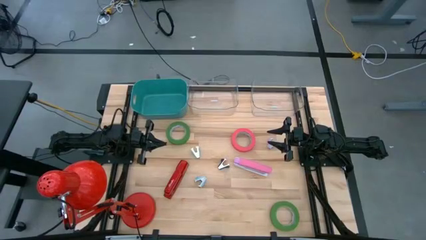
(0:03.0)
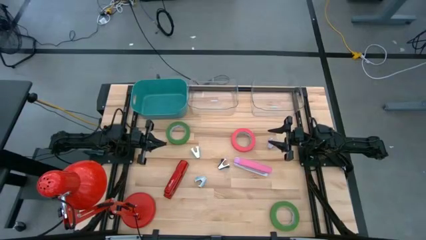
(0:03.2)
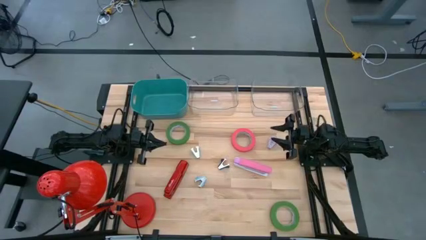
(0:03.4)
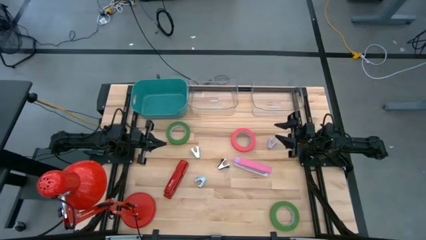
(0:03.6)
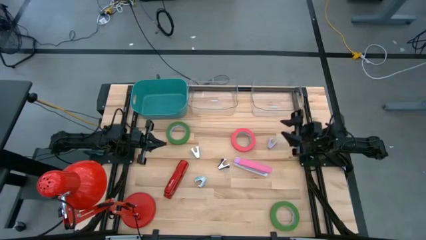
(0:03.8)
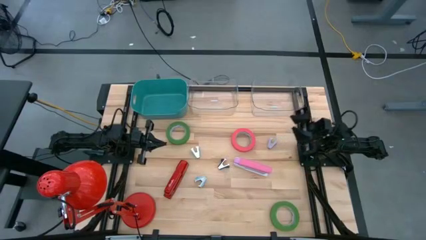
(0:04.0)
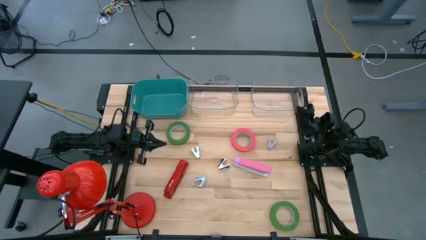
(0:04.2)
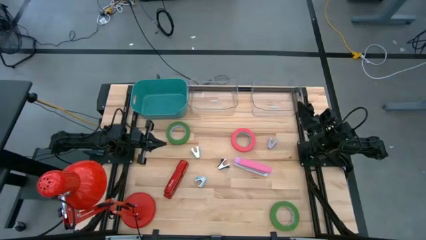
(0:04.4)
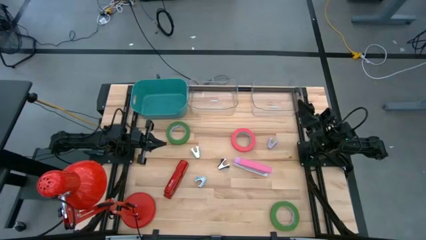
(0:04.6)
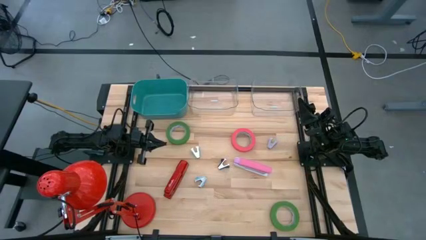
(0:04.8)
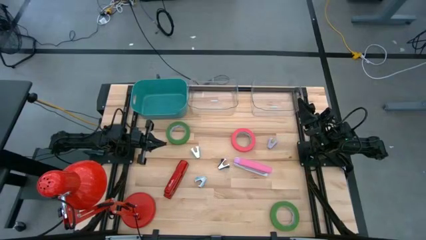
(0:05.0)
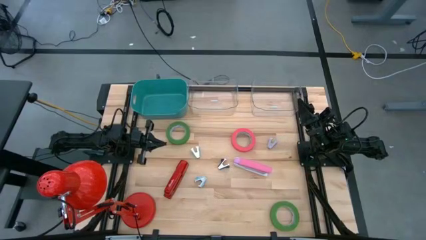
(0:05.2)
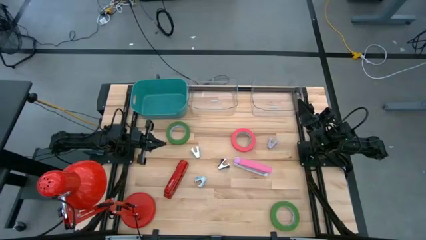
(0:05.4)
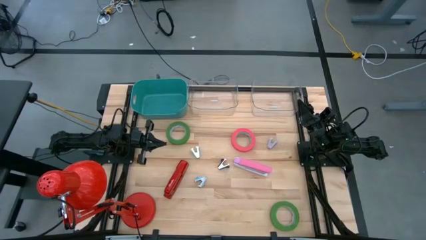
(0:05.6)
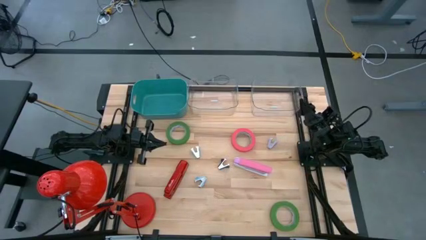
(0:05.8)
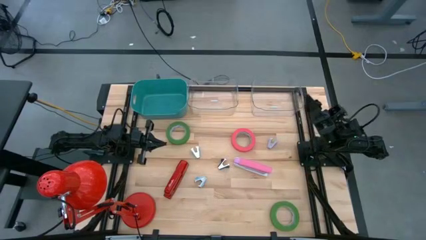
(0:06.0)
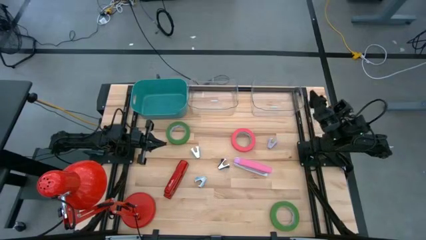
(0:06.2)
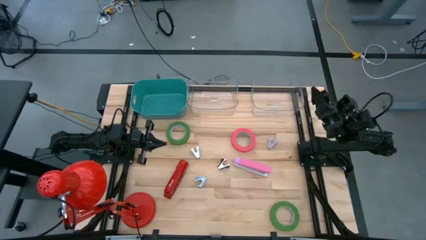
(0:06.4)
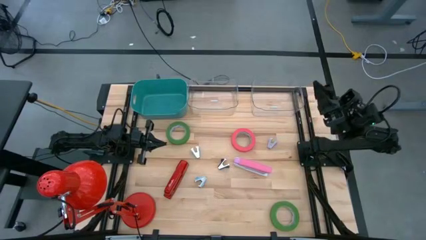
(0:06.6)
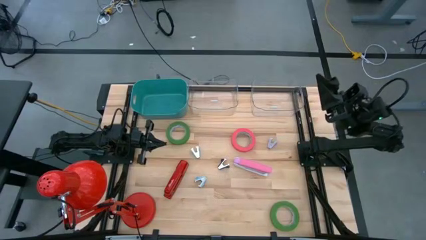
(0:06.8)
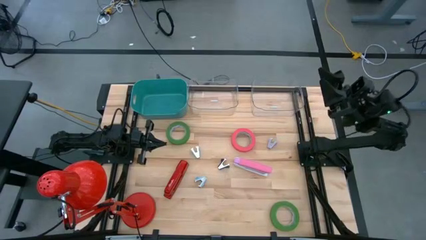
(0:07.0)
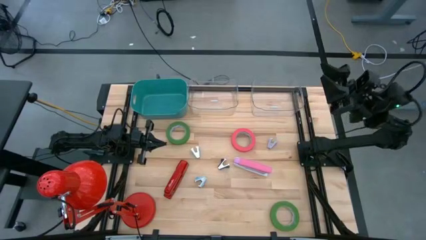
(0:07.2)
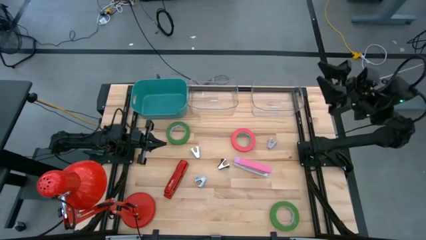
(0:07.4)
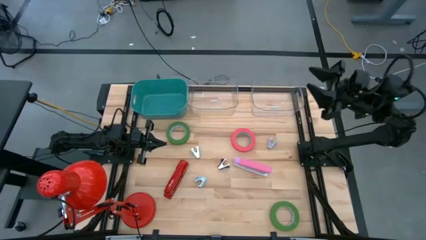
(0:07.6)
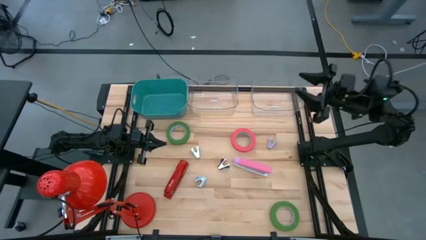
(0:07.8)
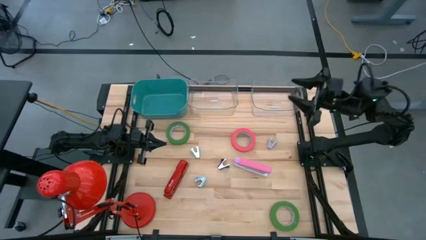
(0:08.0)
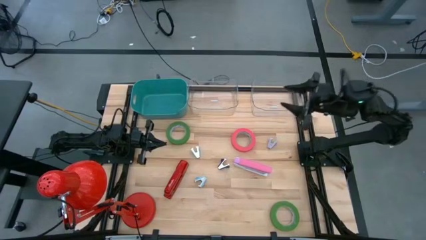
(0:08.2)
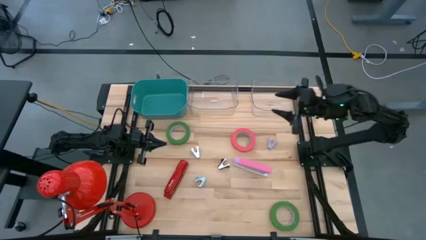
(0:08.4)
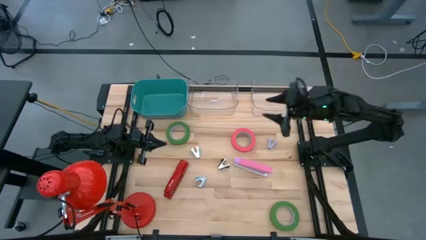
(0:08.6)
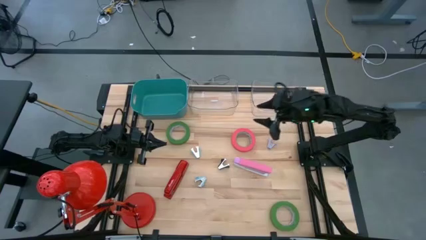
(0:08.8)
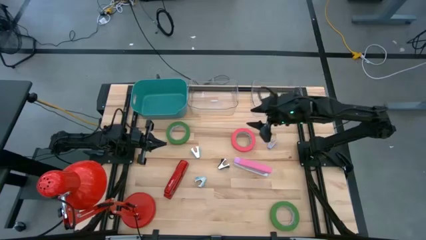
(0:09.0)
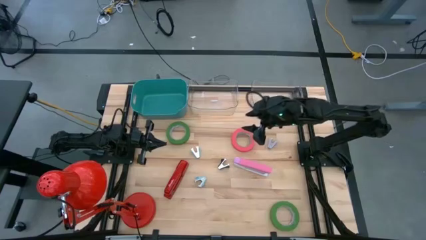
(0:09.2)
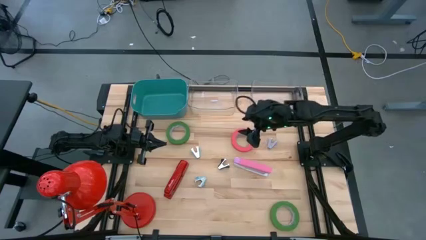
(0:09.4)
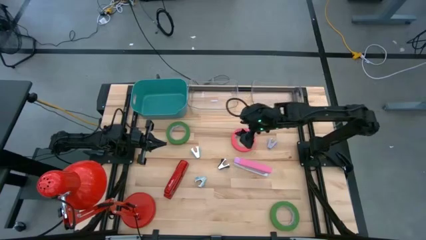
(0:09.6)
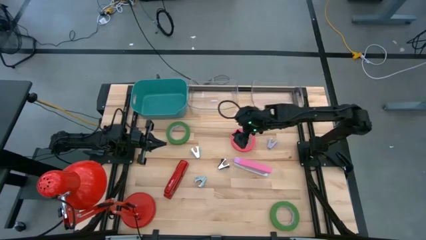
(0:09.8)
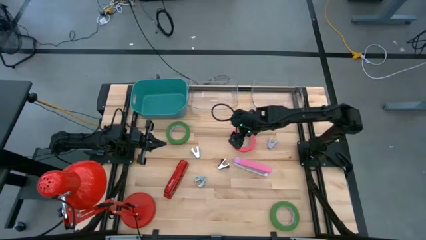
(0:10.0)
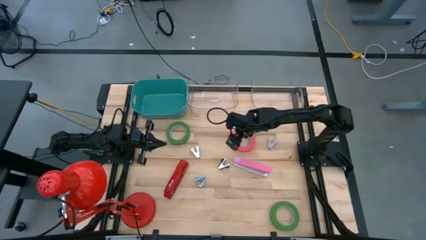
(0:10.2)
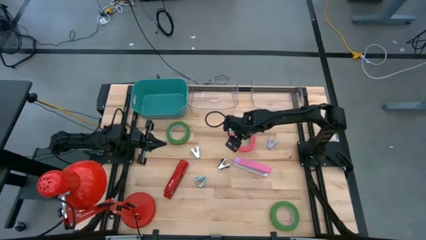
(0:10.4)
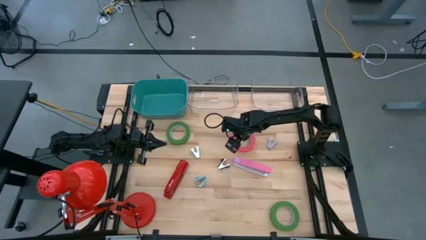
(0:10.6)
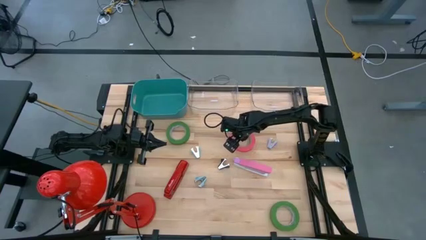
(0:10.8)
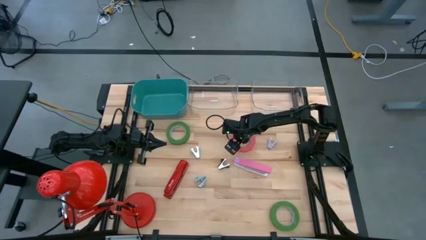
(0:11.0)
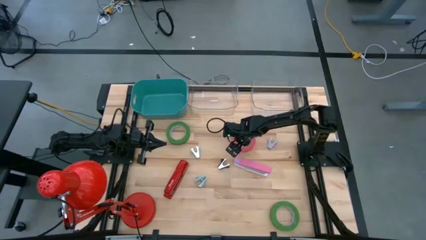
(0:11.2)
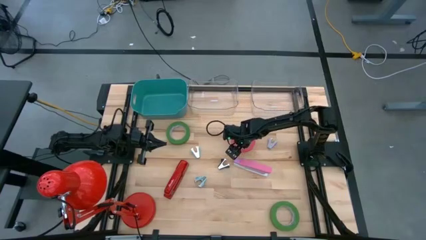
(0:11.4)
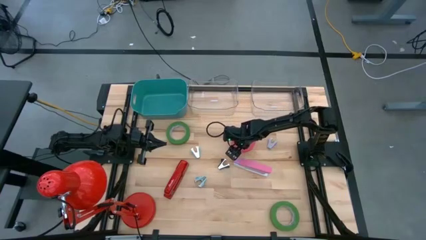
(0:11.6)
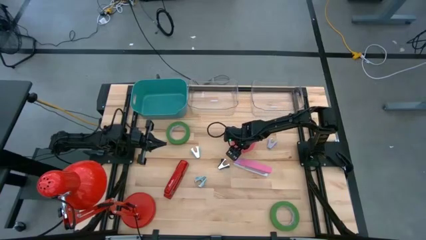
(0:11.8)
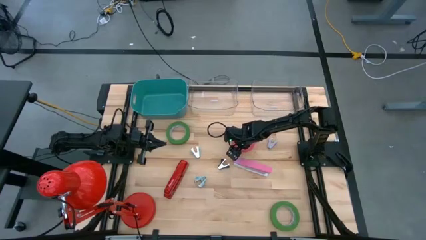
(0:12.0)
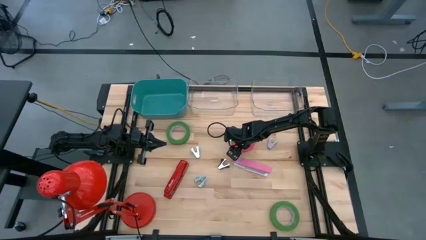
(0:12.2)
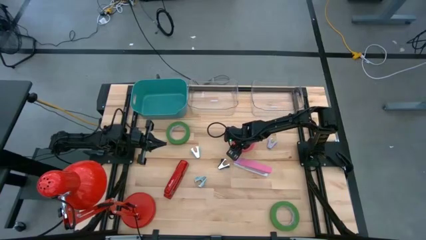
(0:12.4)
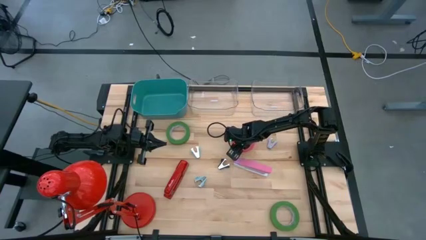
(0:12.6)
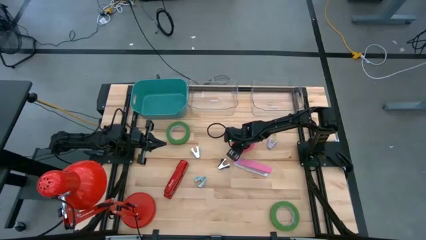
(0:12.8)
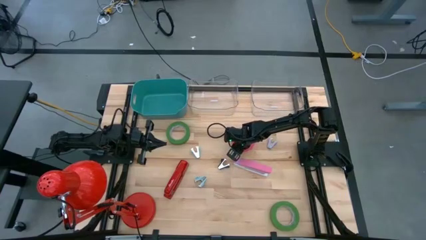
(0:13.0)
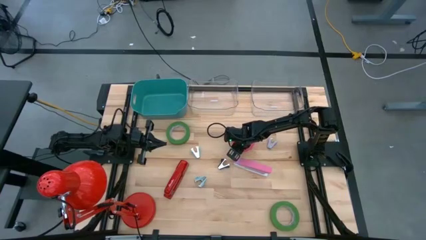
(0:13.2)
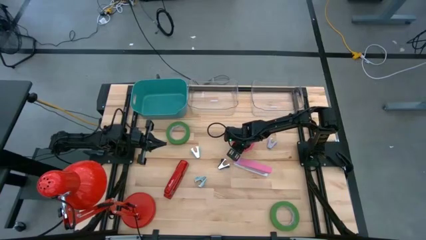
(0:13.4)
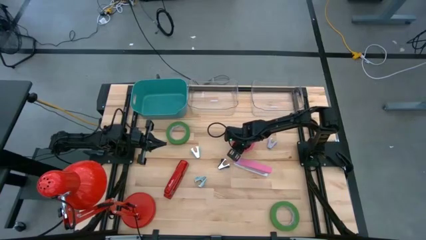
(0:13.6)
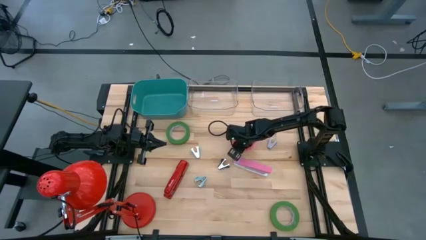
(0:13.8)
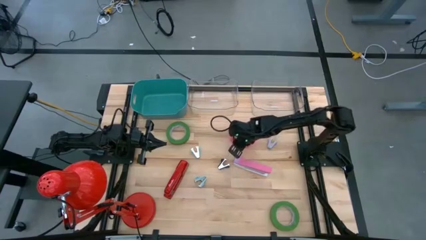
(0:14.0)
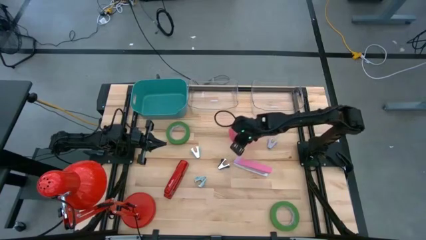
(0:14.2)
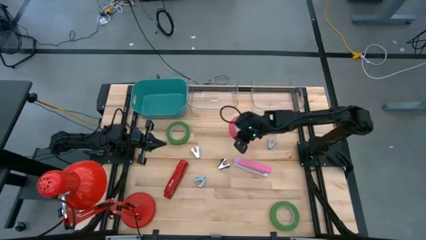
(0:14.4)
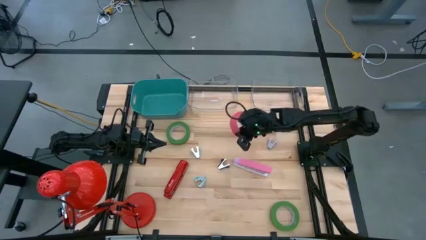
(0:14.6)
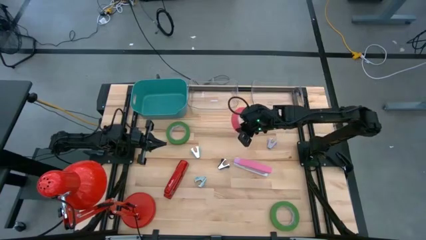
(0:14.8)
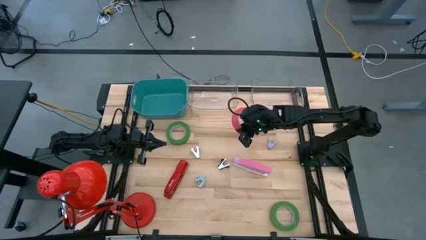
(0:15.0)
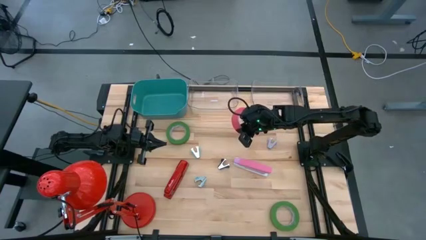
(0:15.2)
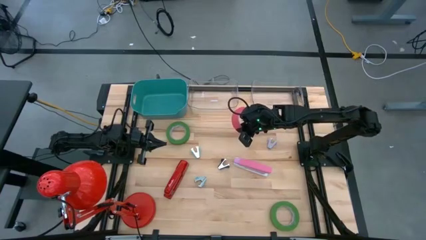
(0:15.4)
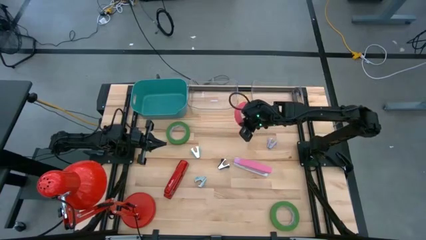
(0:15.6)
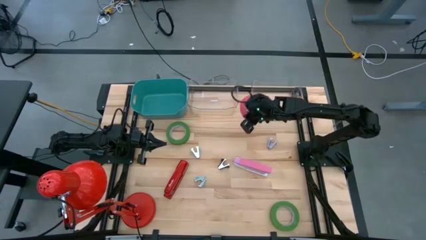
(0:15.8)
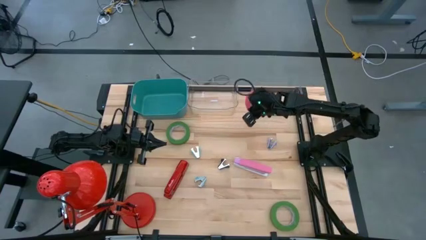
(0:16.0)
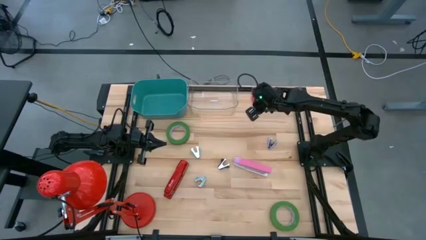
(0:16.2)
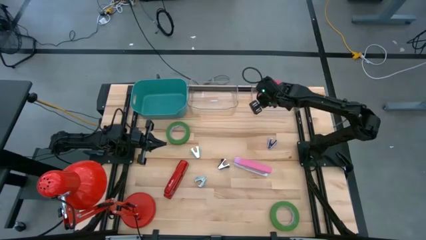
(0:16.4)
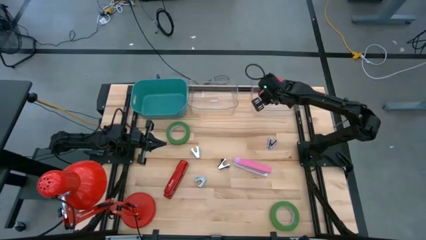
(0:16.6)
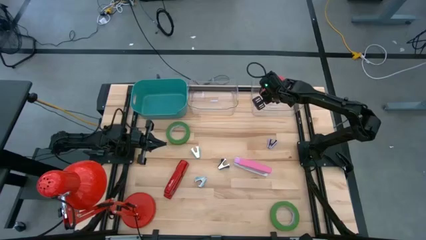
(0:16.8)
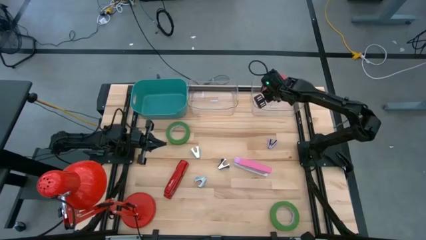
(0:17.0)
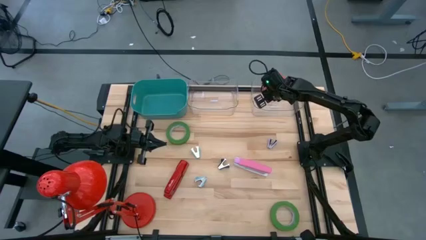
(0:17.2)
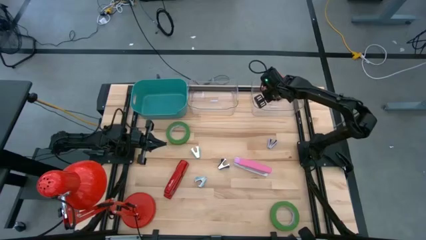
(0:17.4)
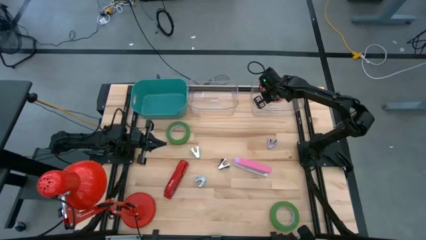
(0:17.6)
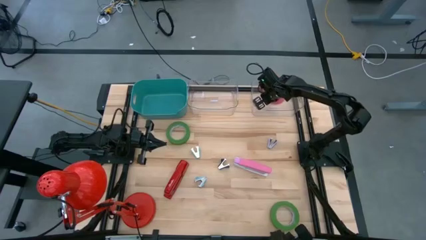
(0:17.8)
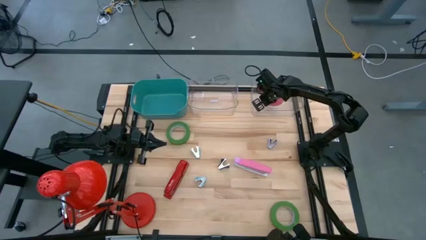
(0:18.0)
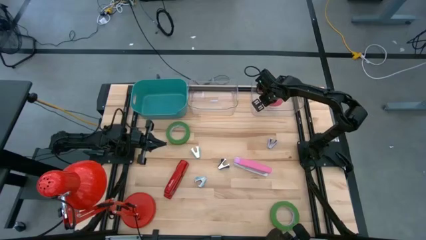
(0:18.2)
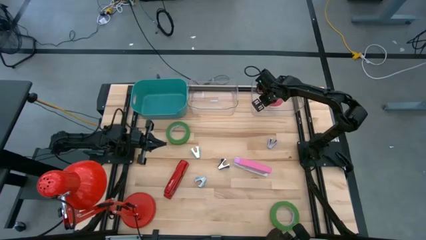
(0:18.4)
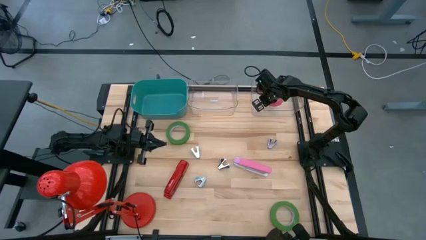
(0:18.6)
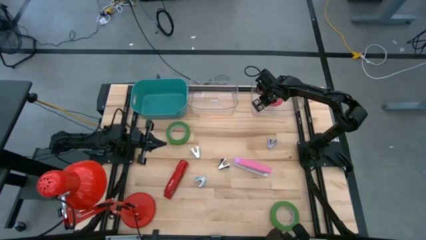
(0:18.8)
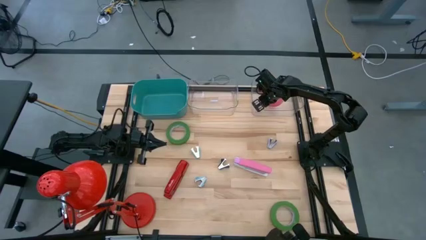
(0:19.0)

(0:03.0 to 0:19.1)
Task: Pick and place Stapler, Stapler remover, tape
Put the pink tape into the right transparent bin
